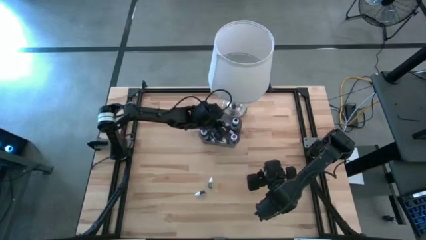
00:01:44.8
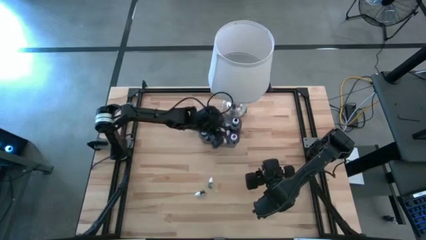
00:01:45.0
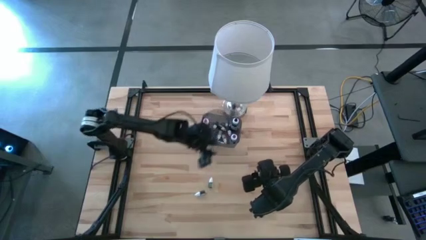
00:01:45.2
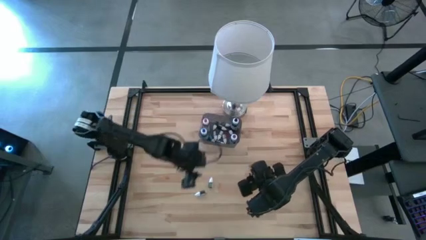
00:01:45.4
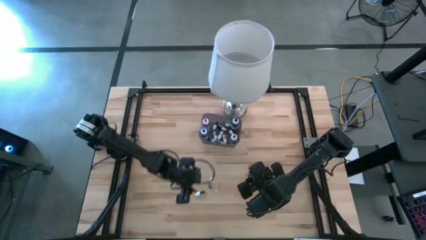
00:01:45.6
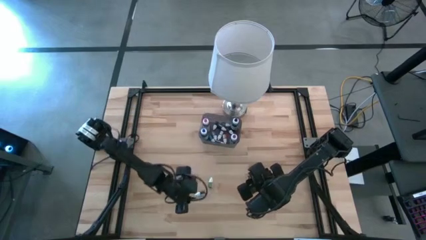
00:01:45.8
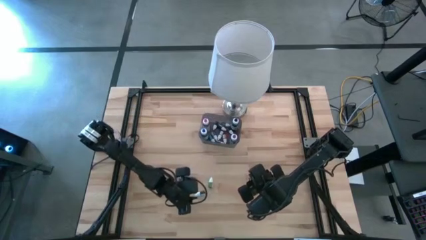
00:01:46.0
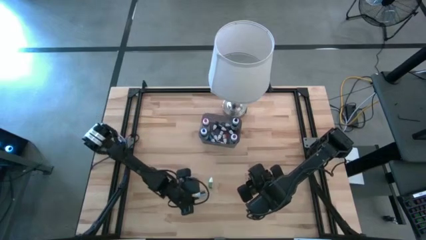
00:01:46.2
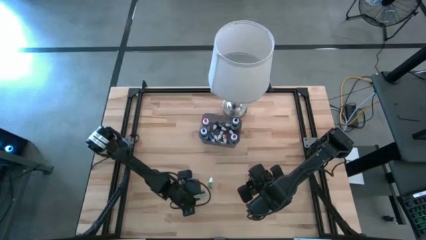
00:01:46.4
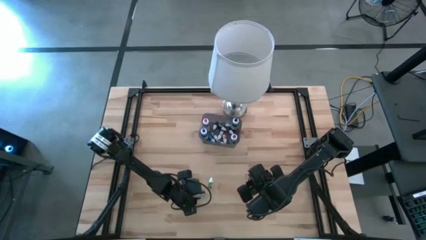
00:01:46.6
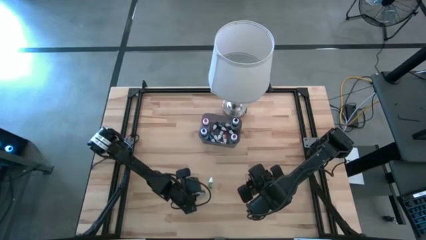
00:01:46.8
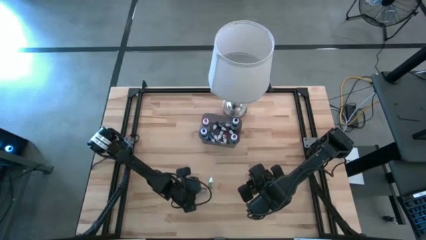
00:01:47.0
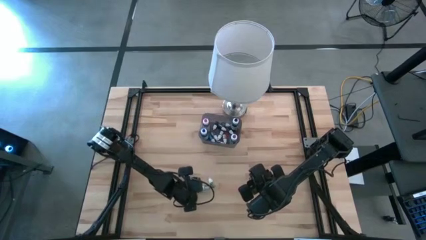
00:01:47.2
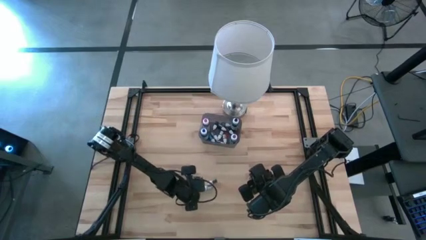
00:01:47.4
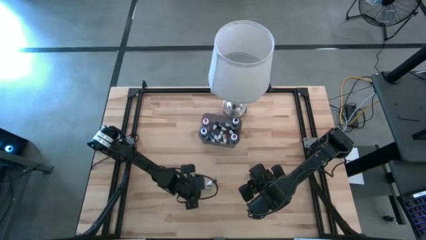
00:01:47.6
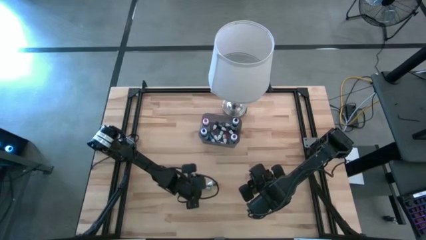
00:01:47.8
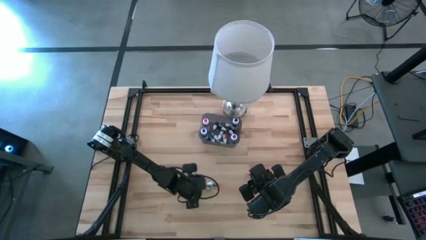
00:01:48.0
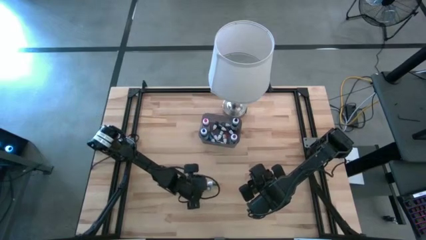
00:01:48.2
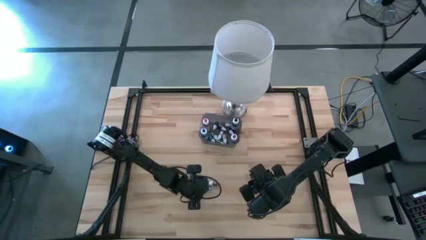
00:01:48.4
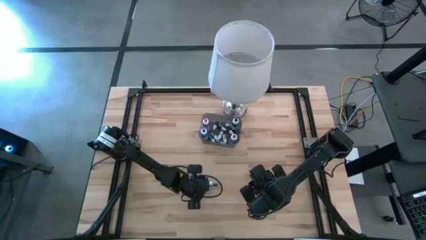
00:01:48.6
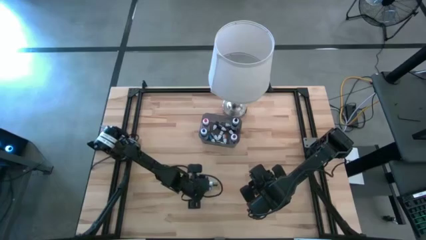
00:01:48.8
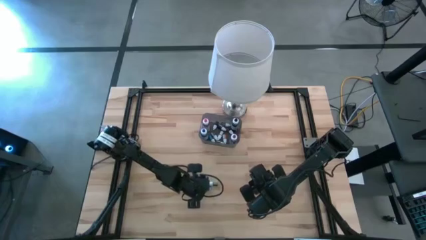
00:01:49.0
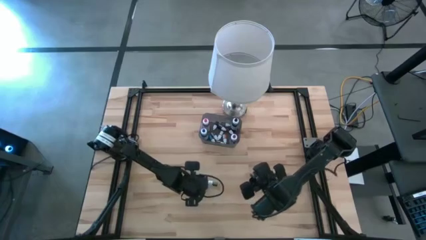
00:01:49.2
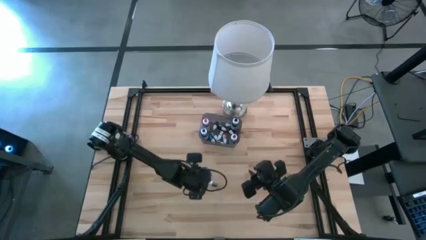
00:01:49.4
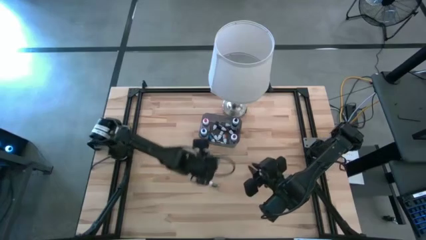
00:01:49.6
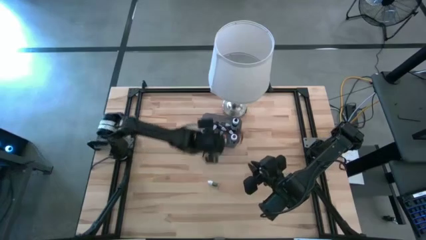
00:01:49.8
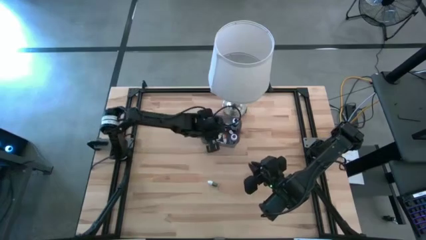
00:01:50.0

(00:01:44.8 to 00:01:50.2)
Task: Pick & Place food coloring
Put the small white food coloring bottle into the black bin

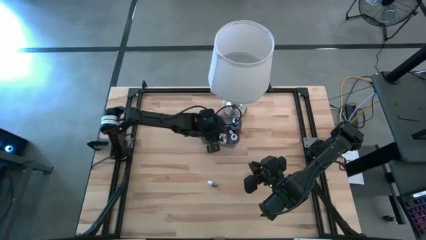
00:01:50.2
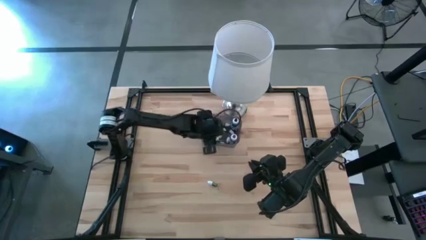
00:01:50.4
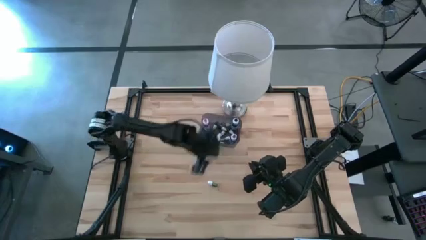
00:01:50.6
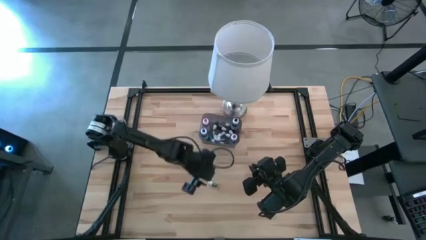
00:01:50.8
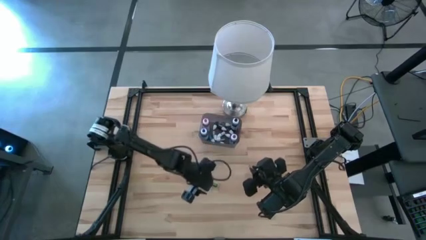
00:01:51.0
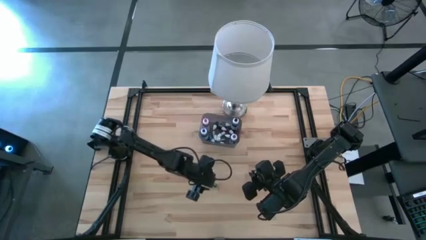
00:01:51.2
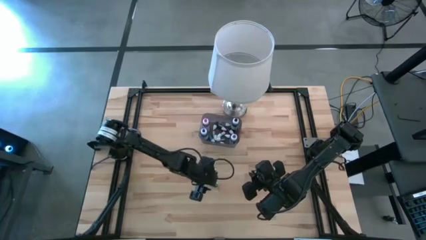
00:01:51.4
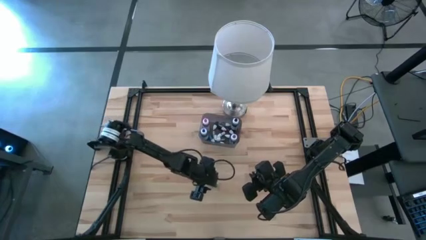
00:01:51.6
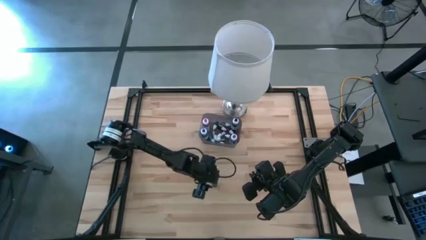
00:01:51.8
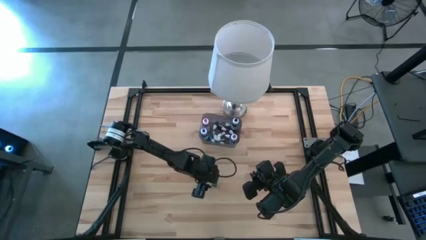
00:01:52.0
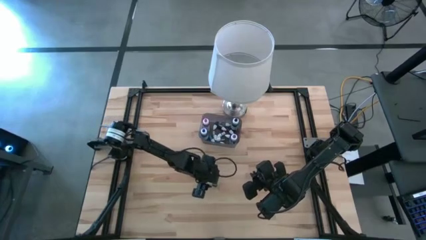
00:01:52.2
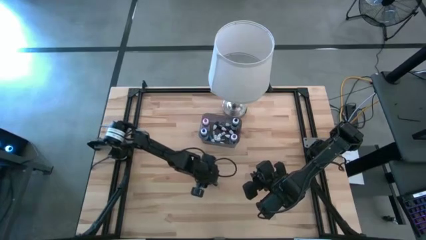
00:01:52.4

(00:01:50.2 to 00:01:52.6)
Put the small green food coloring bottle into the black bin

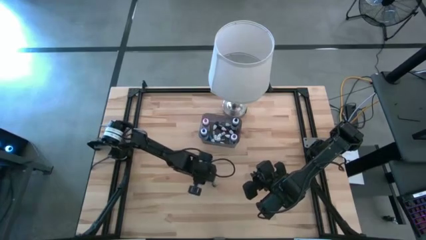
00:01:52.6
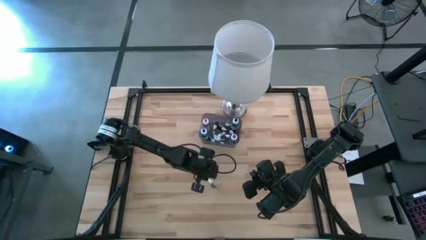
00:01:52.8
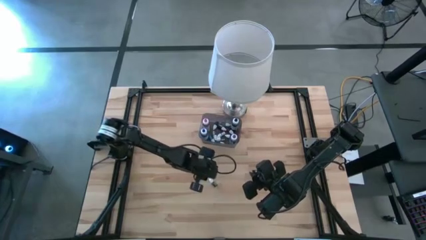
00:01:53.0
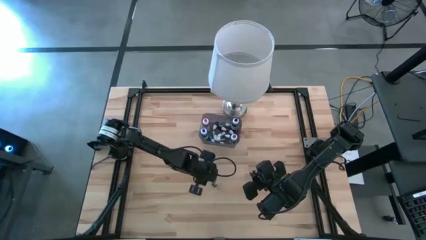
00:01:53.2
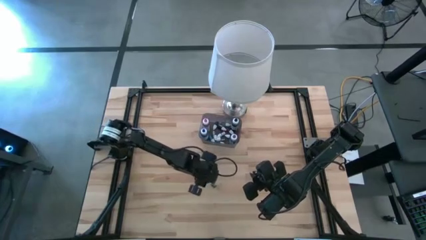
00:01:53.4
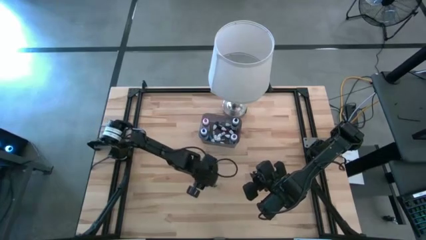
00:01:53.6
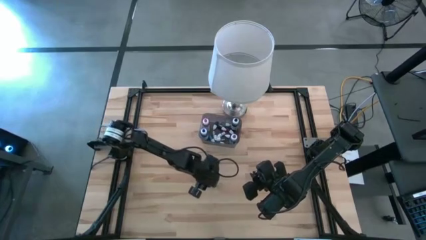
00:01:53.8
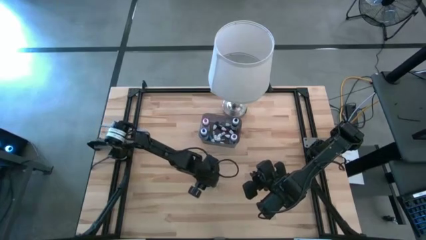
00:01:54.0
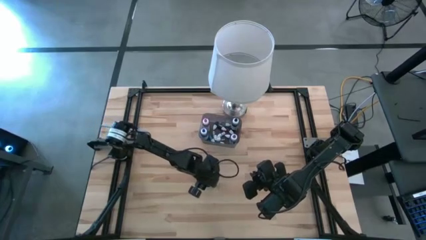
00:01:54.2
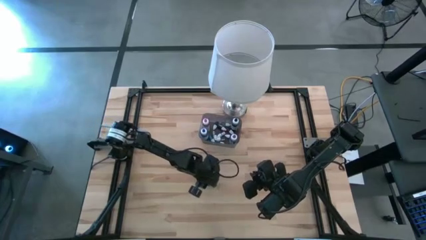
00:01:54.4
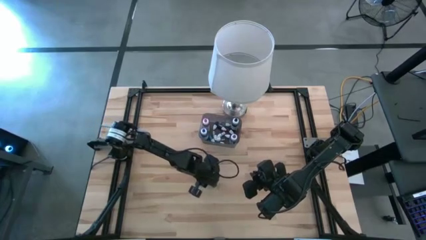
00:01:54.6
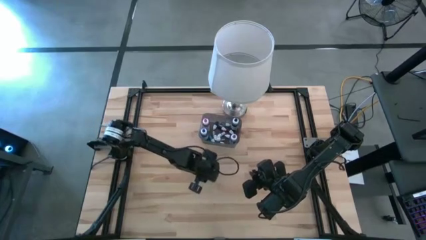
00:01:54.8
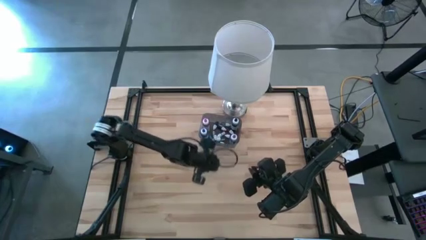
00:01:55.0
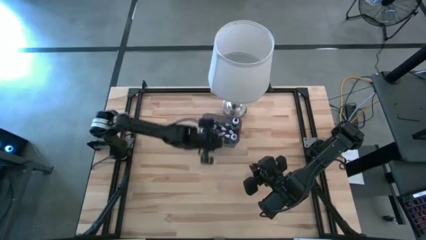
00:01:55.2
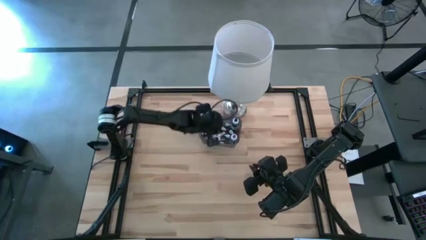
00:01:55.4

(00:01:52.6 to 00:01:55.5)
Put the small green food coloring bottle into the black bin
